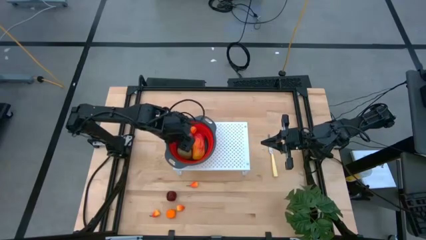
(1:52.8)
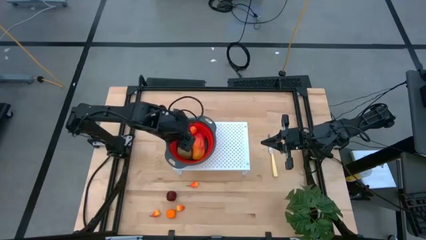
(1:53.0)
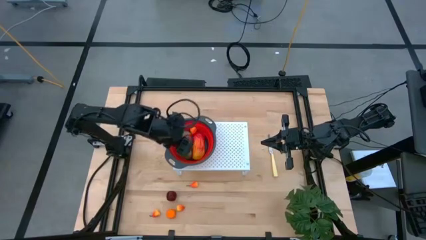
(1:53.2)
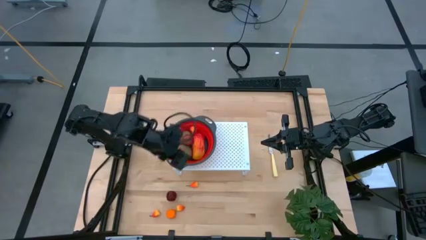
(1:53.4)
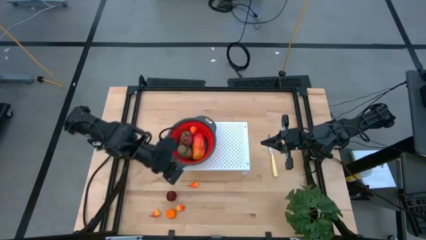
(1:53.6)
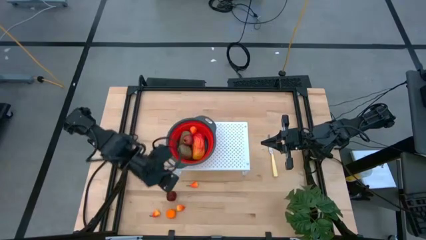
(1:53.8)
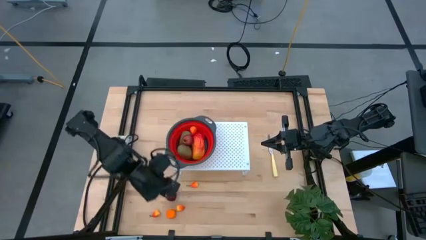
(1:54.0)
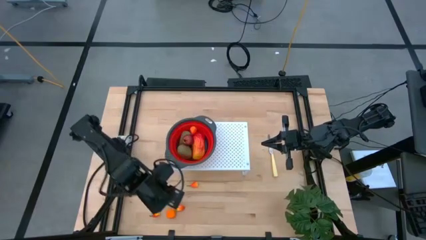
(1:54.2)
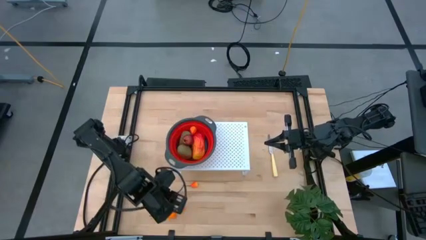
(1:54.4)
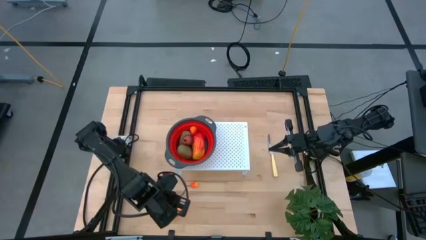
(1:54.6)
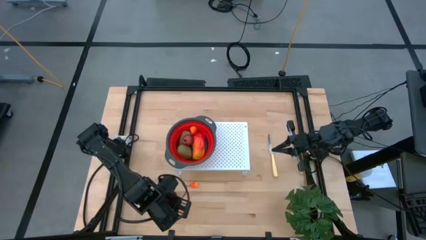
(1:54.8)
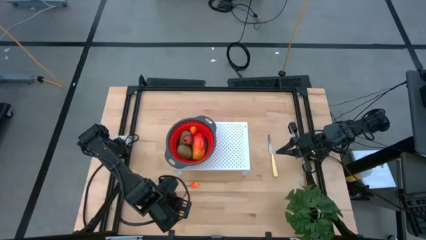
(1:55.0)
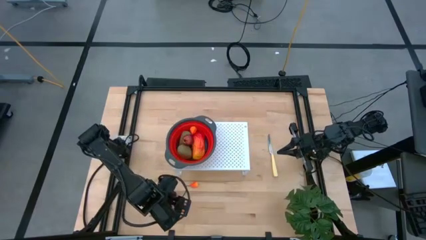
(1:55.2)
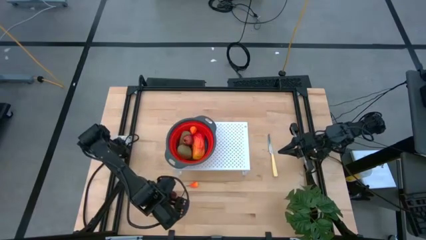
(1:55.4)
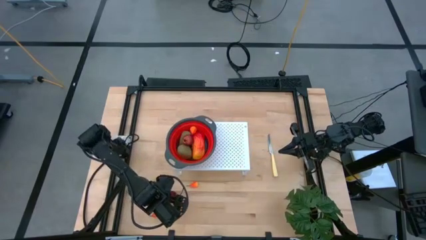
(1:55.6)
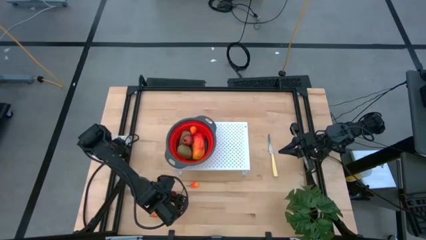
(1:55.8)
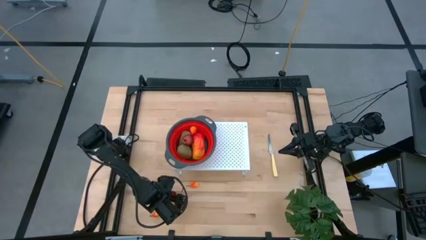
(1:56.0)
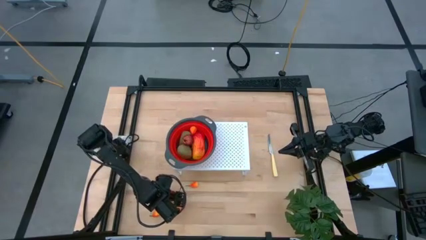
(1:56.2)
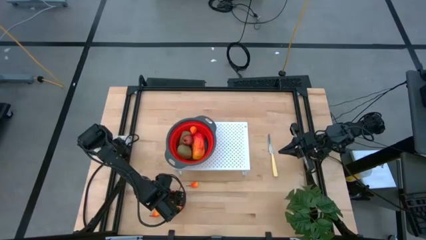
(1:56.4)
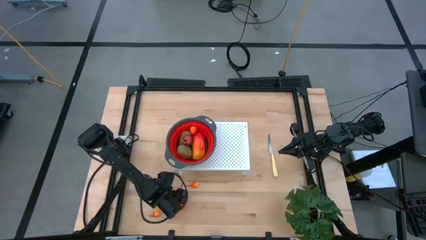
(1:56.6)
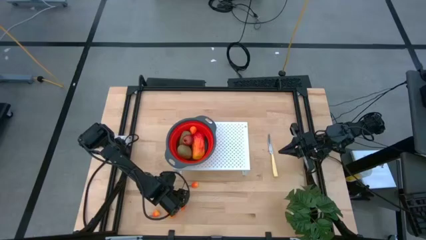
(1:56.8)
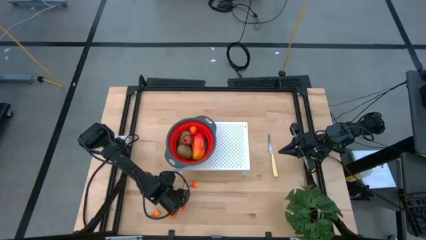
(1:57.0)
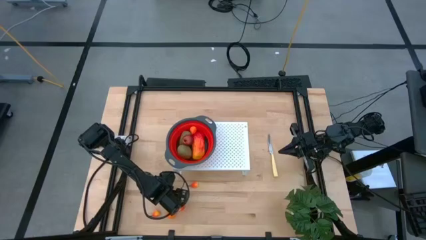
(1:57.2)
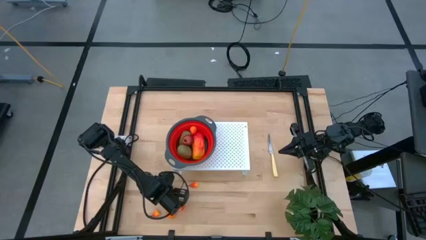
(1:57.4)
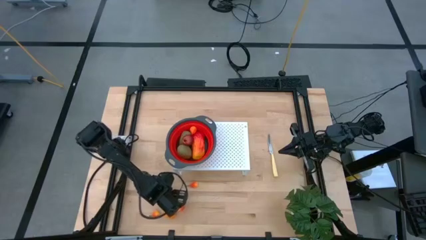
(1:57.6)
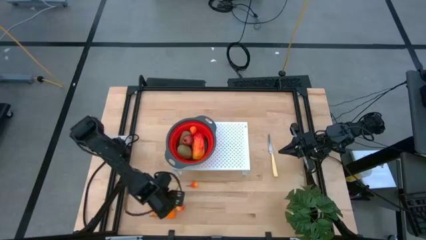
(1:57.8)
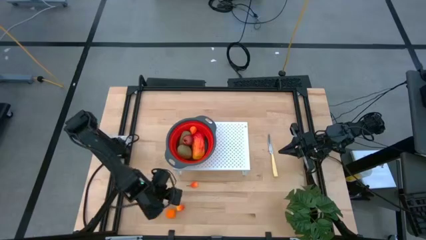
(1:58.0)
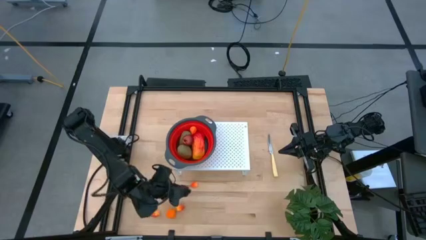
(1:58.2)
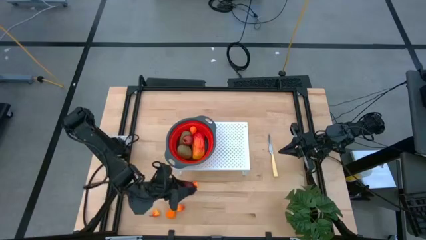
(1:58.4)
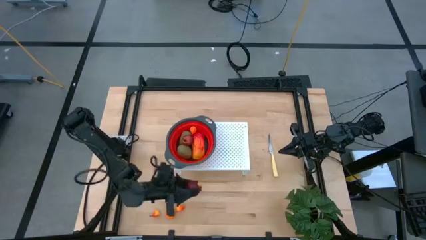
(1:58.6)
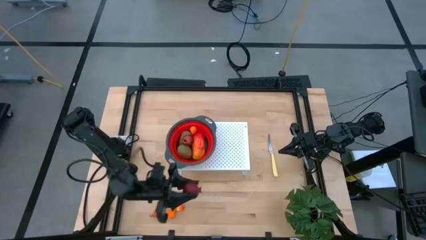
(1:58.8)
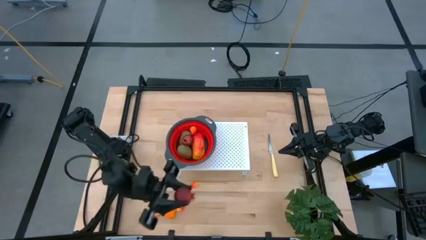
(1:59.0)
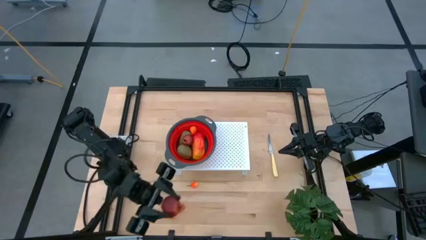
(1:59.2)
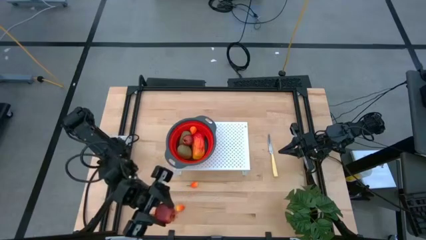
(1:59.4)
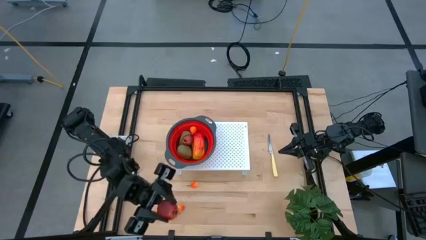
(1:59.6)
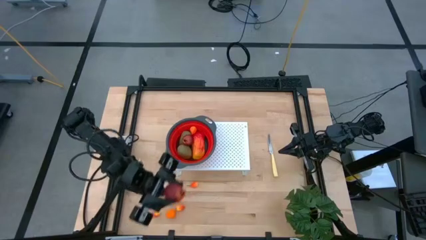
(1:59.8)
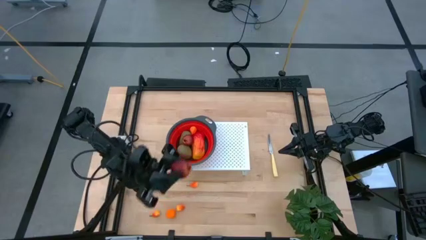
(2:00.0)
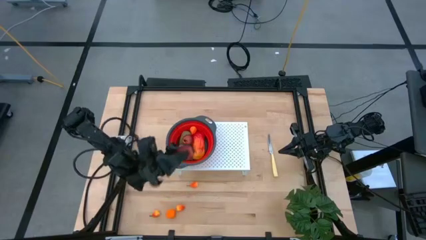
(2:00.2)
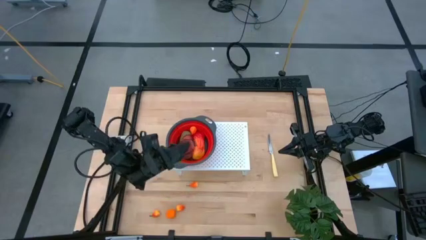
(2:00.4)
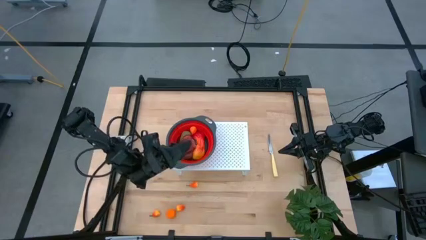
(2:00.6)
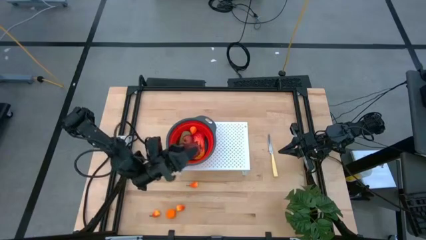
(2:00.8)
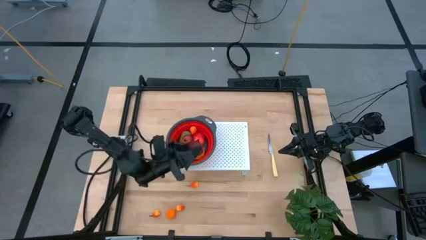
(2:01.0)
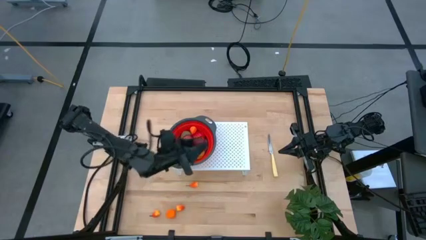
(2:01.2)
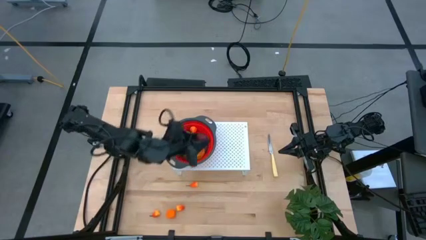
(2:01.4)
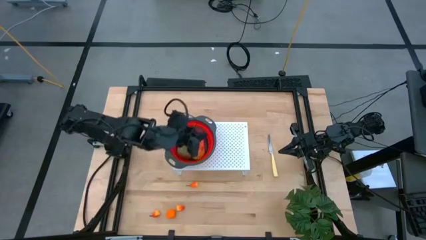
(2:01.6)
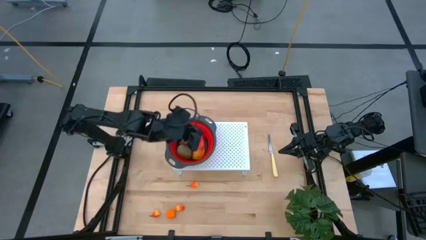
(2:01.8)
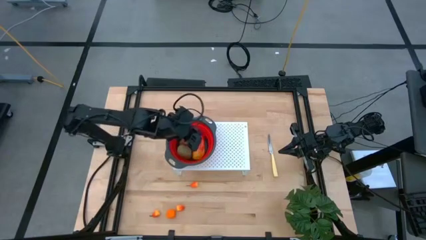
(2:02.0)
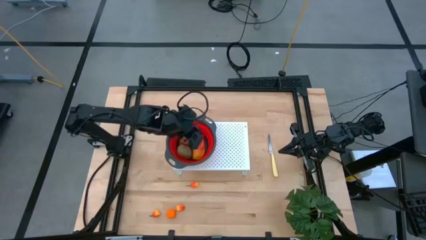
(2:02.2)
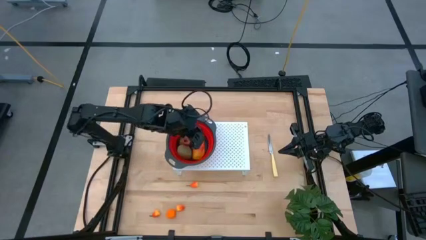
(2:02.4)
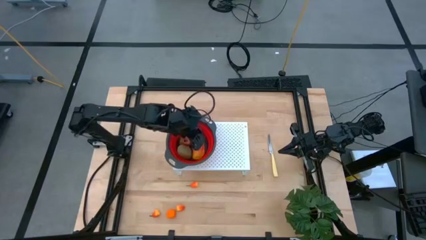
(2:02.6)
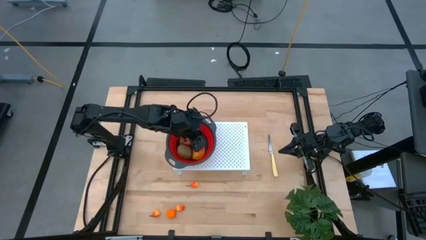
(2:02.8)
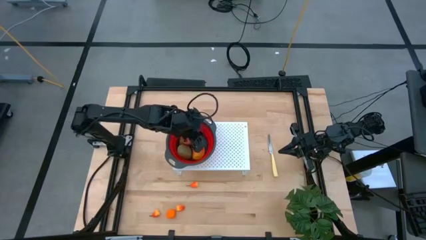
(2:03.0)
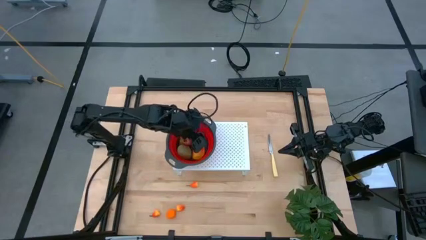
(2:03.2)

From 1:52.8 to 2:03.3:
Task: Pick & Place Fruit
Put the red pomegranate into the red strainer bowl on the shelf
